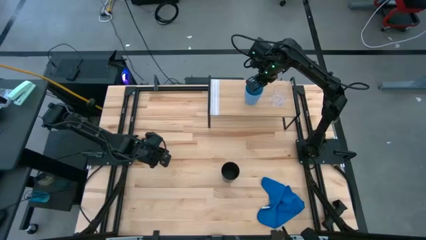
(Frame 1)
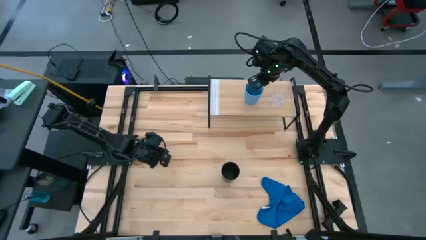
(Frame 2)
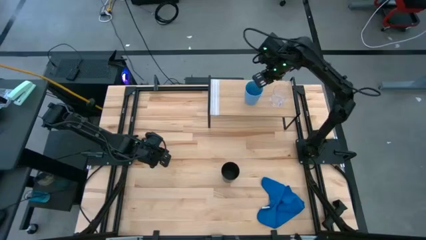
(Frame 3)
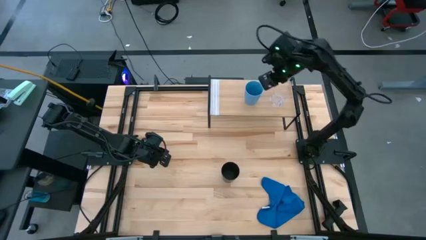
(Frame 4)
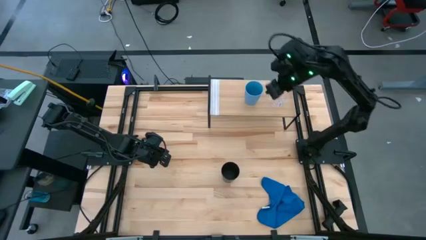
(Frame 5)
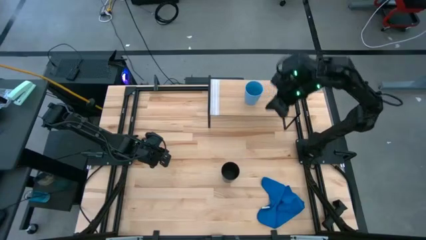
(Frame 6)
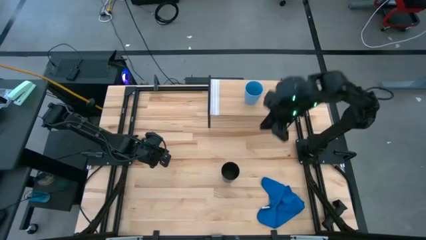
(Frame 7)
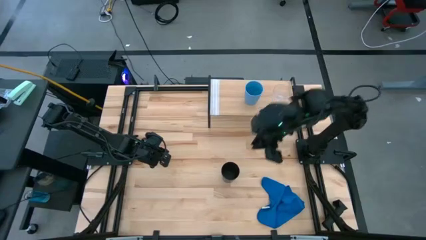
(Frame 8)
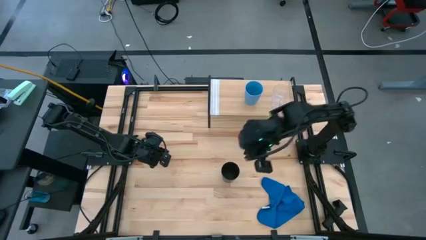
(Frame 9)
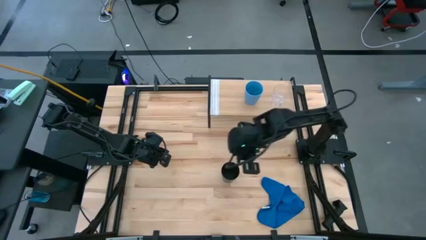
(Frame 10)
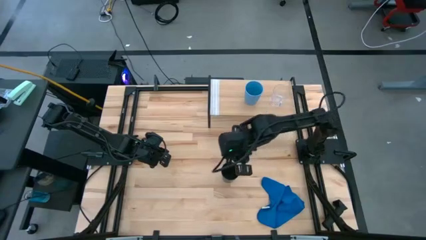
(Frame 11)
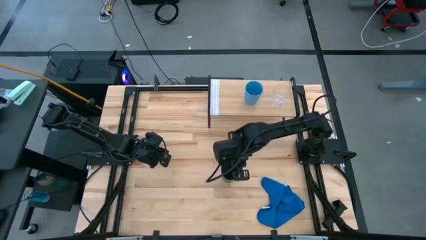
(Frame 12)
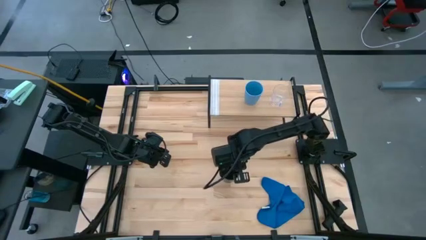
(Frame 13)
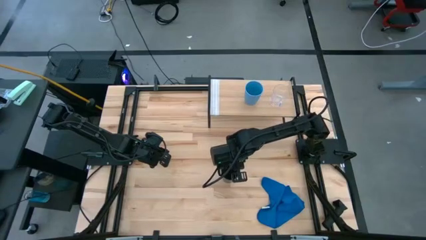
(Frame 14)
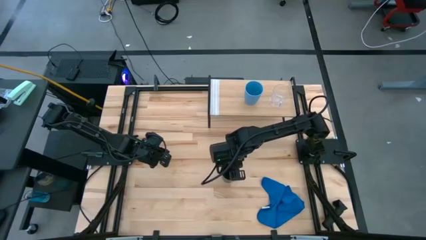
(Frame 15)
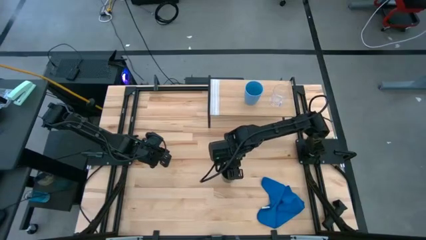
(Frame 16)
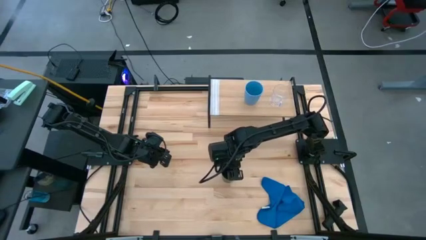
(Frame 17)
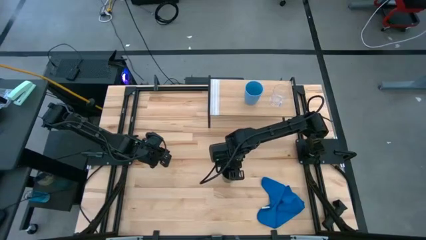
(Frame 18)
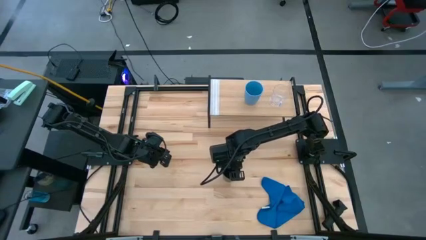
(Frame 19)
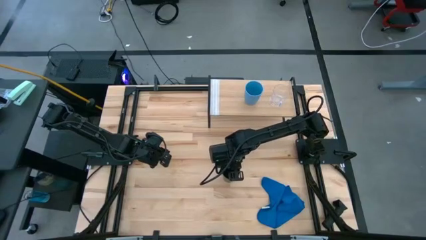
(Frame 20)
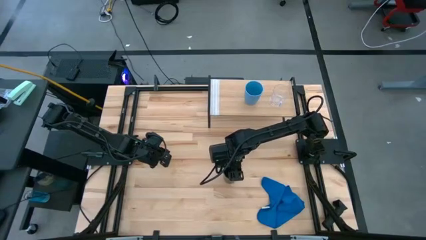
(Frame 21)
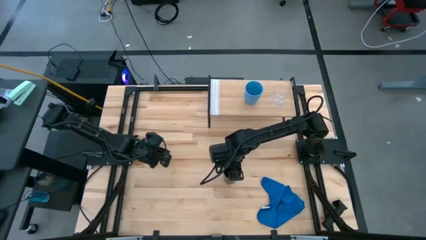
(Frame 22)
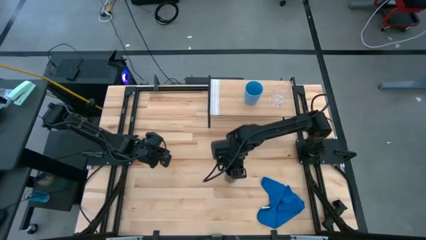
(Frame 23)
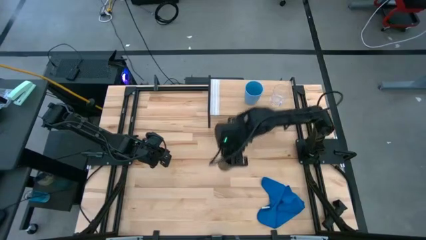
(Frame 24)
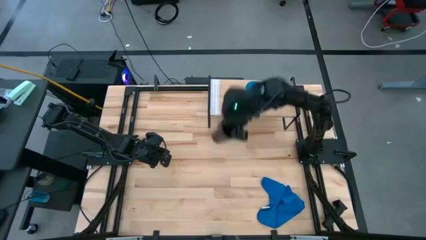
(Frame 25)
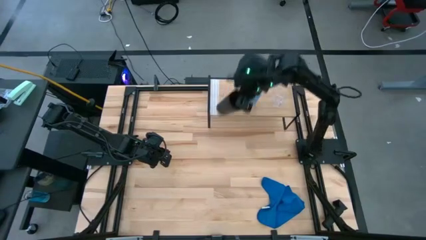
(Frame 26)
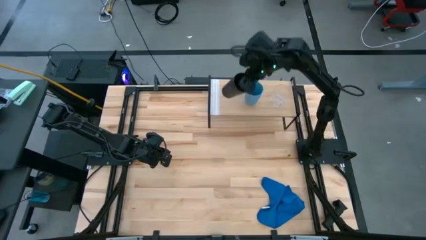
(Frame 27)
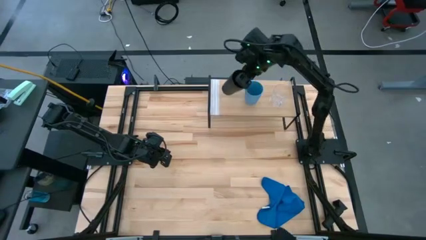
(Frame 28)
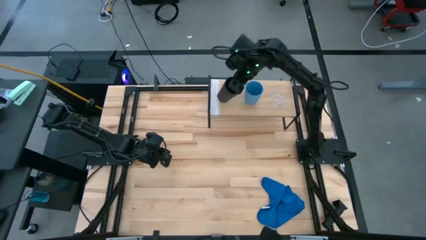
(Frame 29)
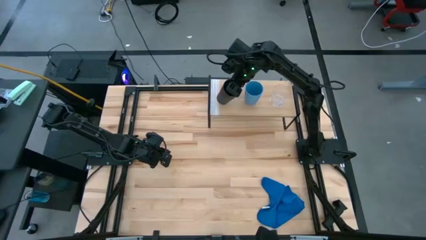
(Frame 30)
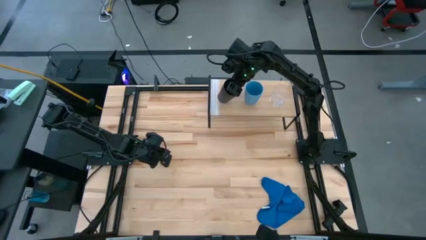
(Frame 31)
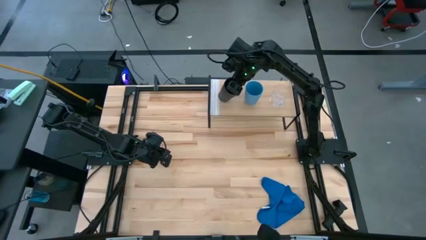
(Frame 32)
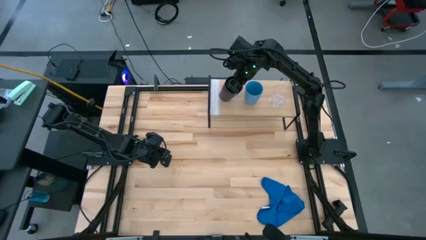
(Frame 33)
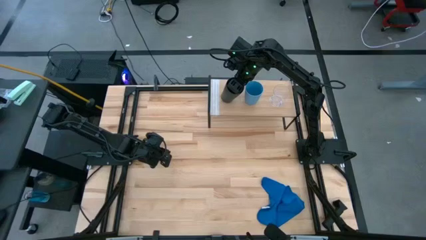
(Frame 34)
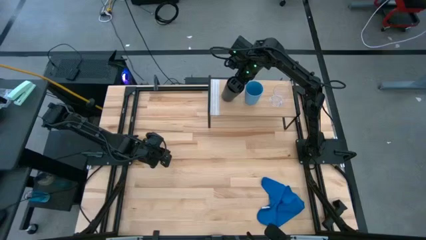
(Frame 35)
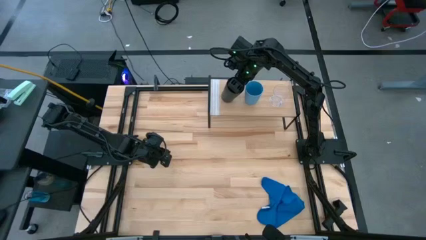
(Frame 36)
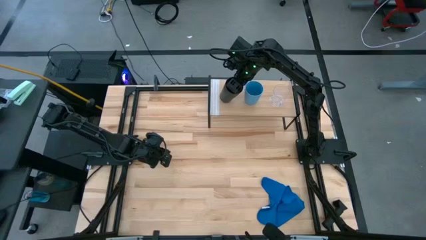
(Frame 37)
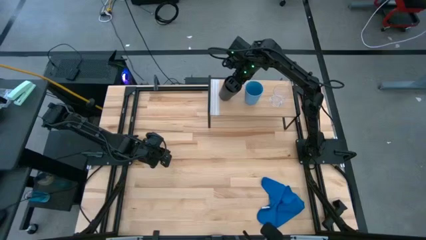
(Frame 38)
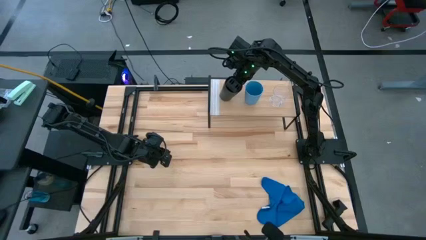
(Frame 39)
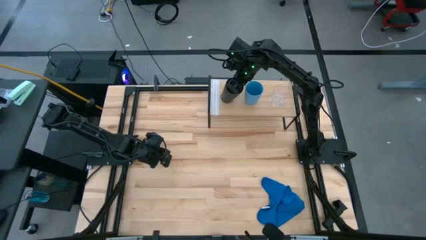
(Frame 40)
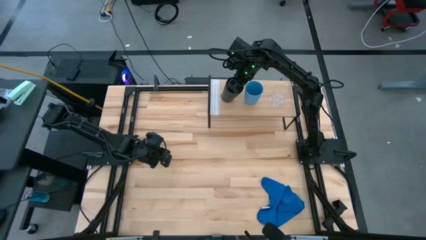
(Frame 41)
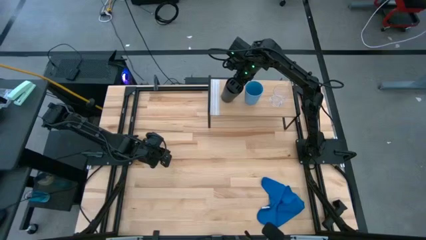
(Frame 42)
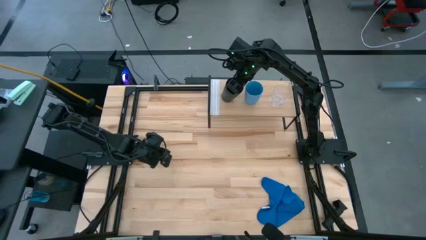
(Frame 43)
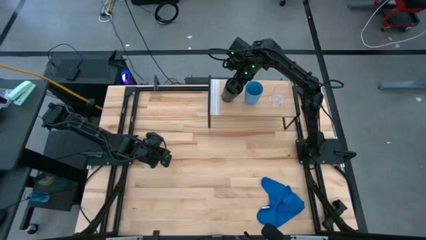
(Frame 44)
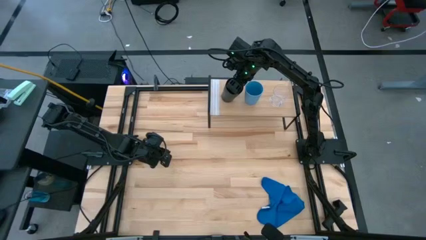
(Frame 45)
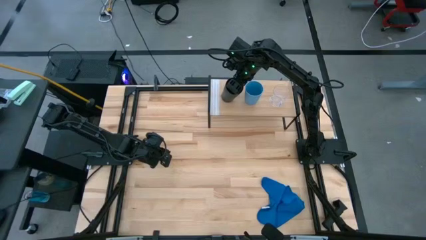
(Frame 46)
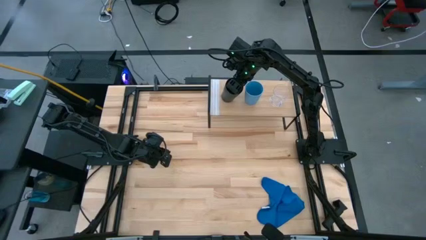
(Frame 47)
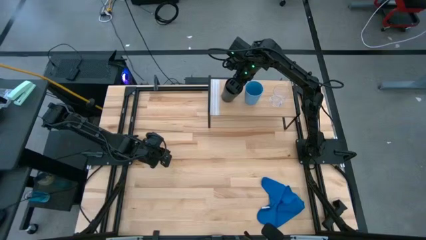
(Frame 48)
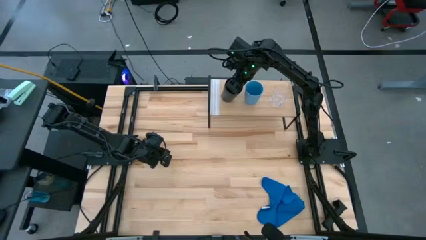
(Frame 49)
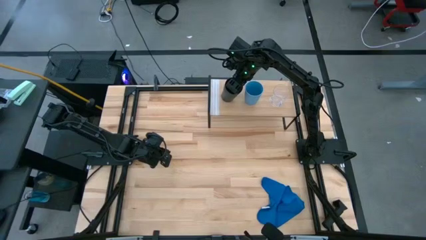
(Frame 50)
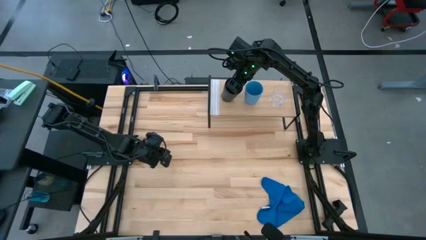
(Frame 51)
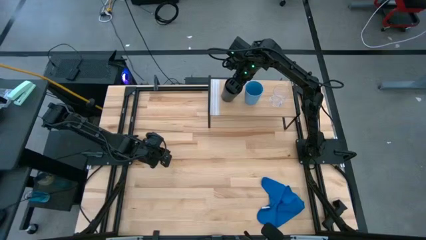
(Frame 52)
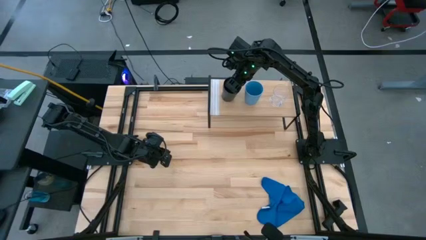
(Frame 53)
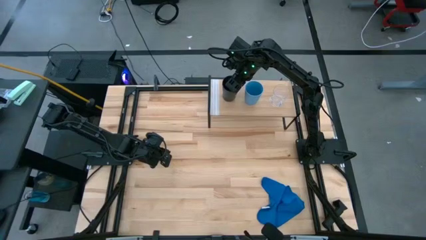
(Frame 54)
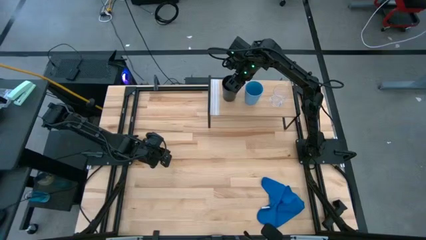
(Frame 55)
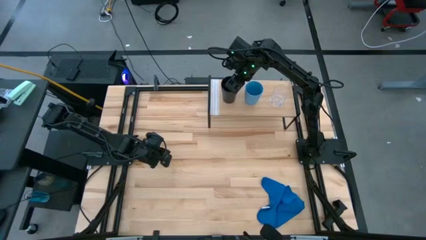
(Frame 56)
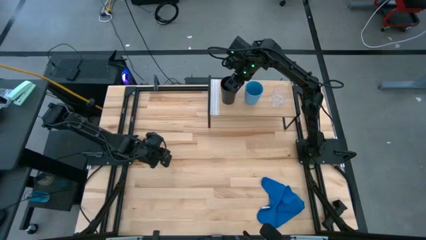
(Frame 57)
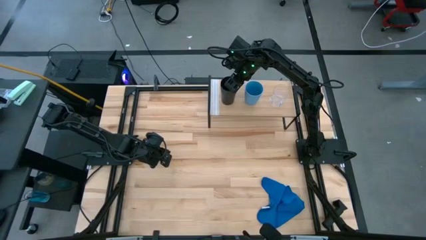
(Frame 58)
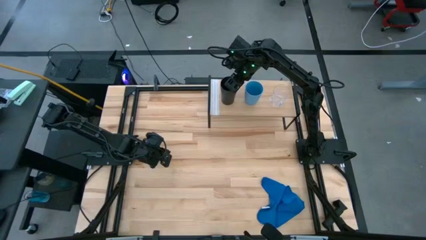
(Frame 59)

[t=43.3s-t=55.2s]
Task: Stack small to large cups/mugs on shelf
Put the black cup on the shelf

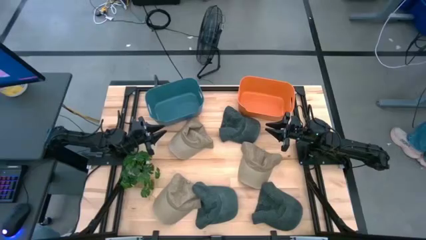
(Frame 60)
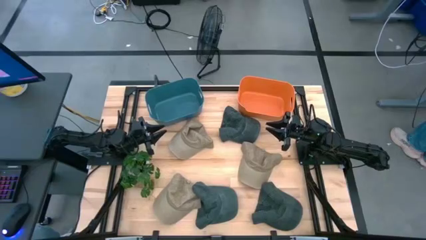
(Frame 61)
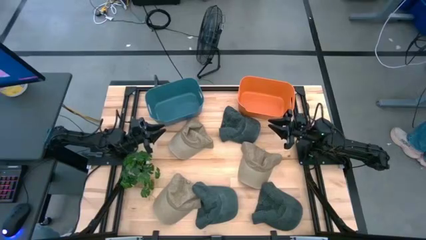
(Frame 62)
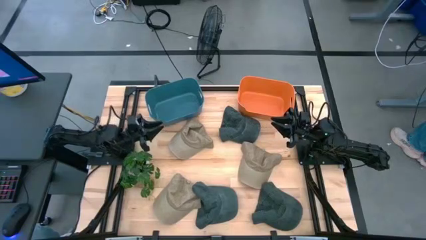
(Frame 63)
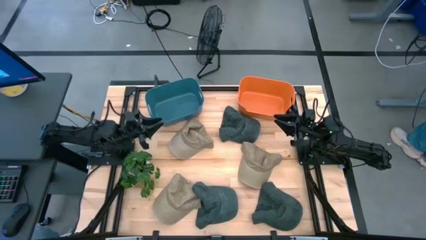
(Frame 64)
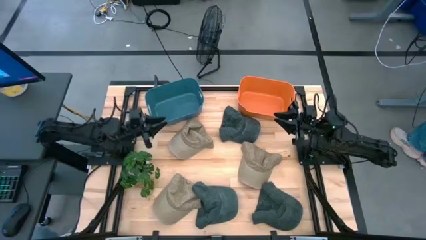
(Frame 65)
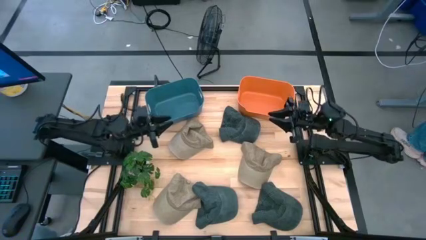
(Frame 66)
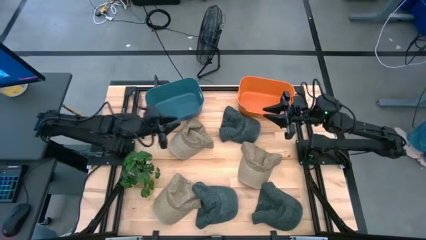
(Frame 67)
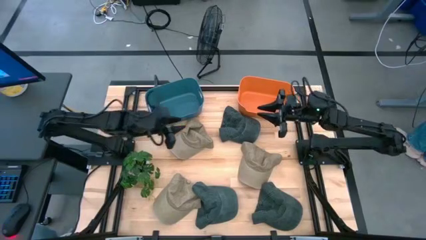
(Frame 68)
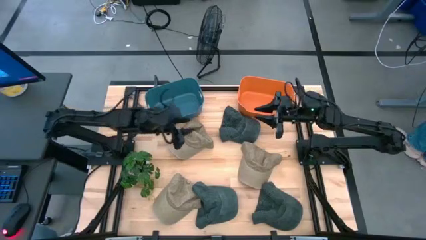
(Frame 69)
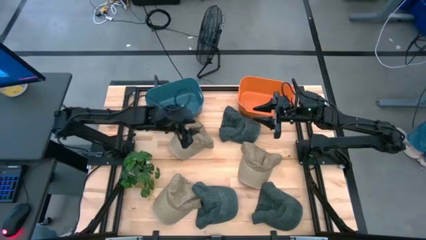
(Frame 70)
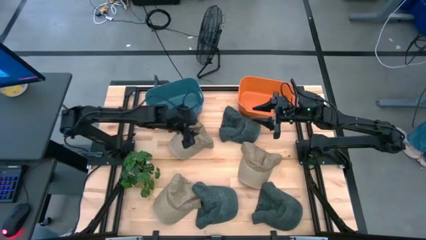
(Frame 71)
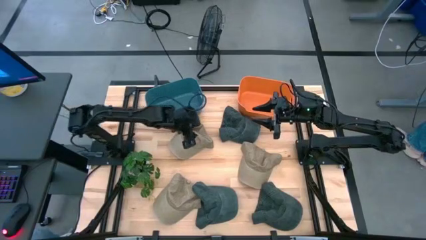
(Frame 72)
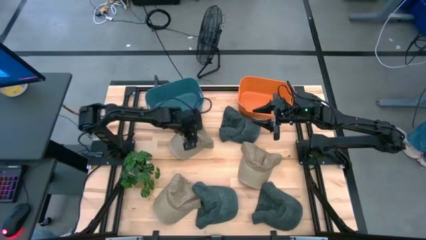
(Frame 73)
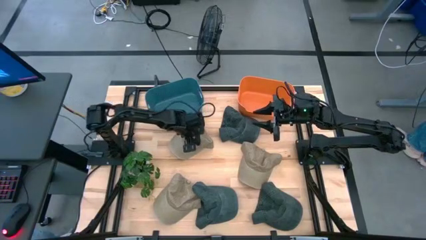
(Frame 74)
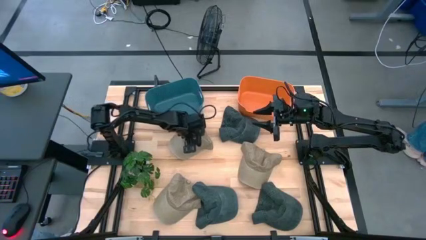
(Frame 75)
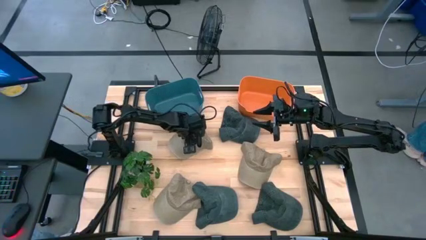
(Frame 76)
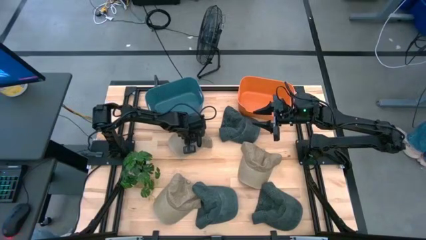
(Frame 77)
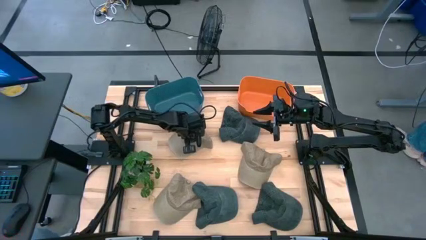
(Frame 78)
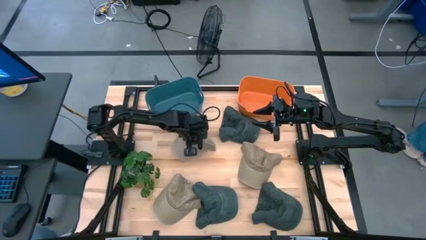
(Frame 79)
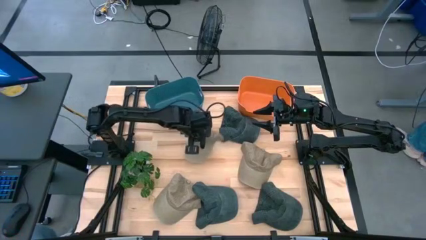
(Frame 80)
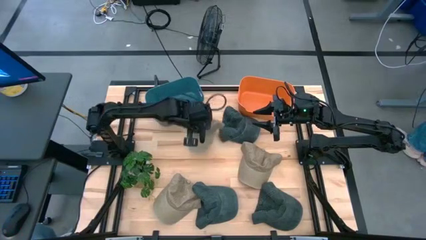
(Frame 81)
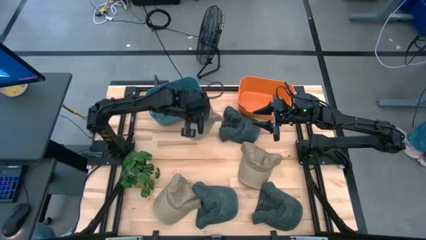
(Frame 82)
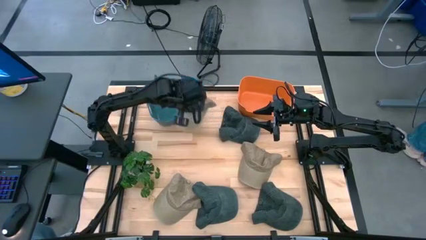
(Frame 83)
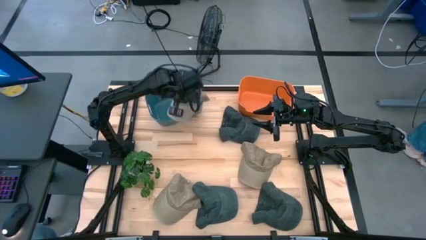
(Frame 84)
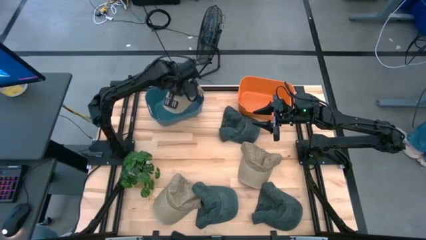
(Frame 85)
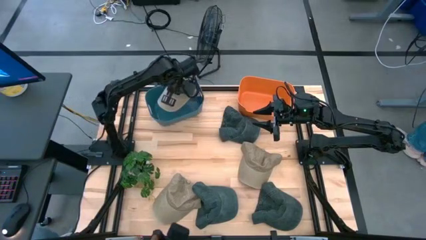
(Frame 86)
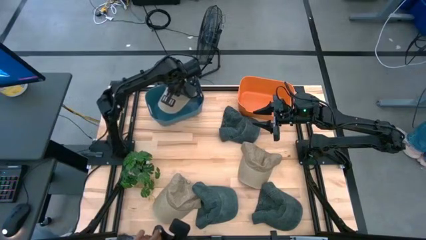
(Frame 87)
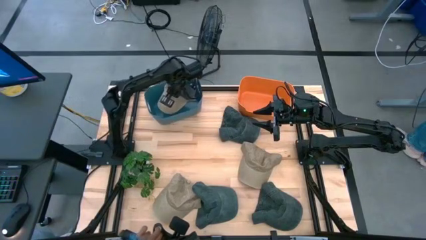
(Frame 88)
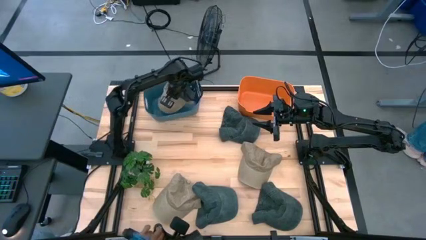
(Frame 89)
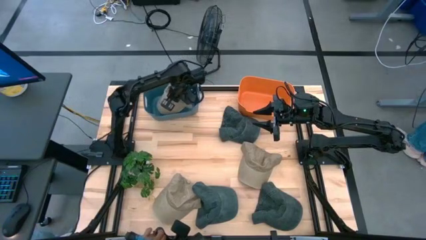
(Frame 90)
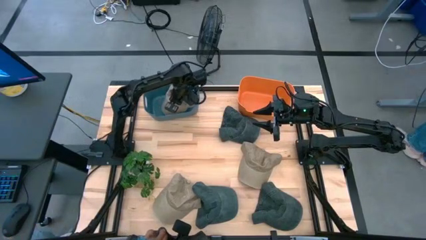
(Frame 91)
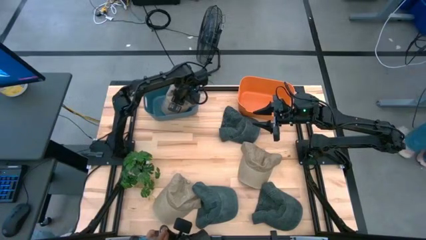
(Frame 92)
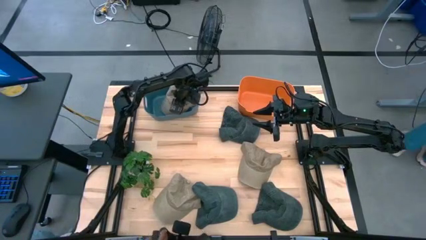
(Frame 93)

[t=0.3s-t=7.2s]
Task: Pick & Place hat
Put the top brown cap into the blue bin
